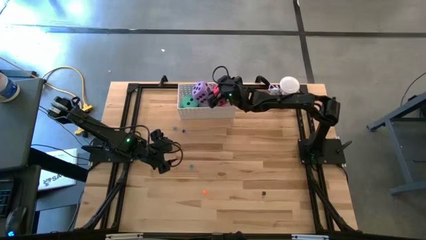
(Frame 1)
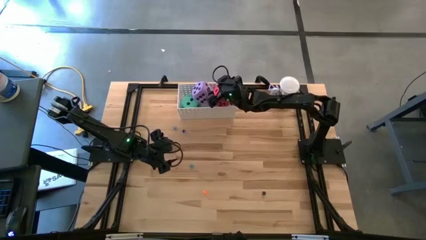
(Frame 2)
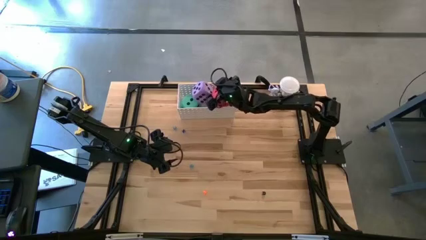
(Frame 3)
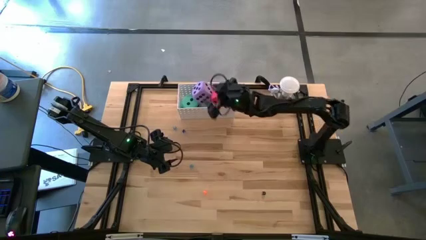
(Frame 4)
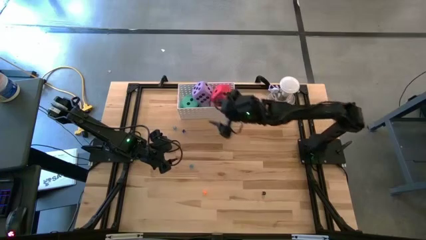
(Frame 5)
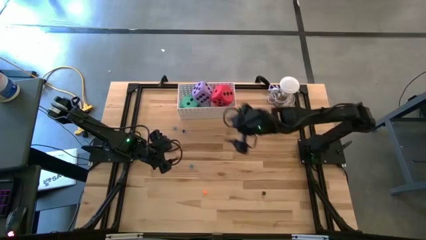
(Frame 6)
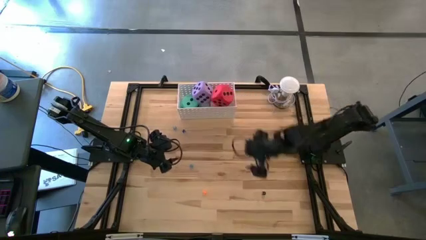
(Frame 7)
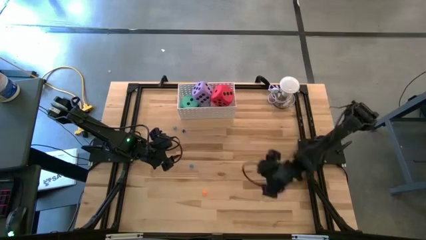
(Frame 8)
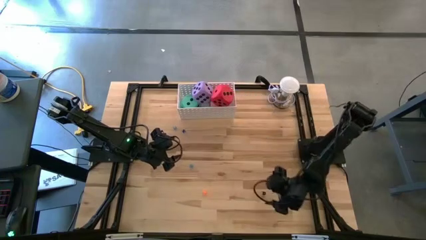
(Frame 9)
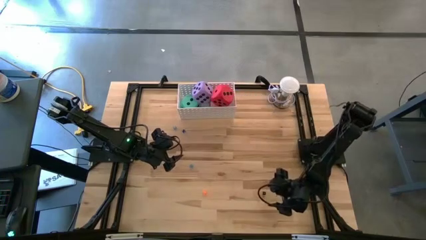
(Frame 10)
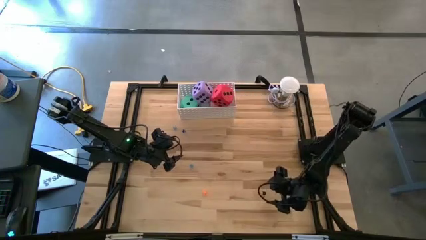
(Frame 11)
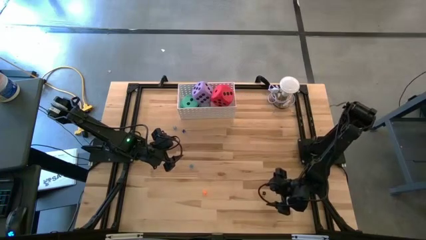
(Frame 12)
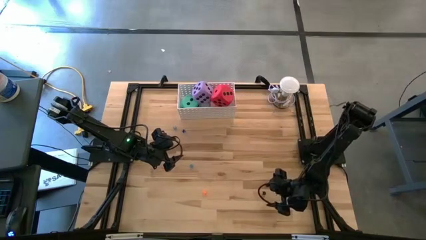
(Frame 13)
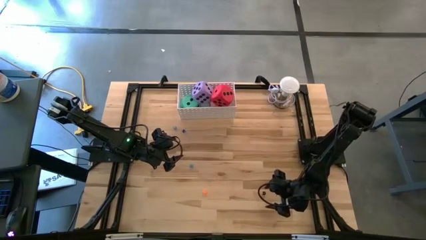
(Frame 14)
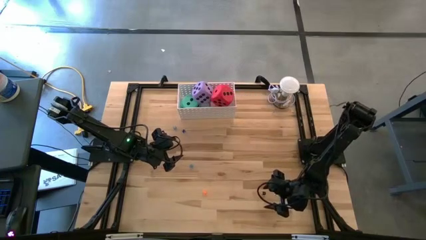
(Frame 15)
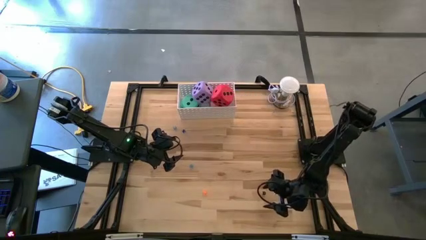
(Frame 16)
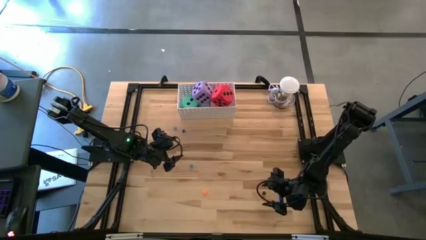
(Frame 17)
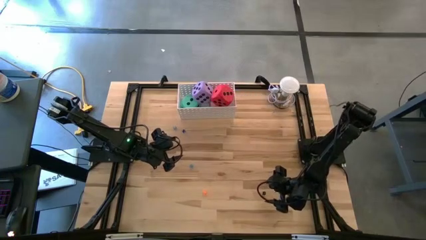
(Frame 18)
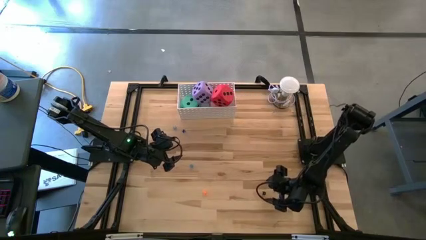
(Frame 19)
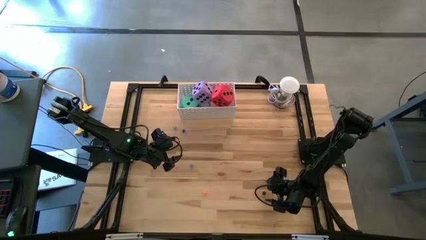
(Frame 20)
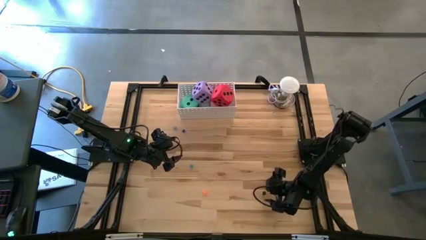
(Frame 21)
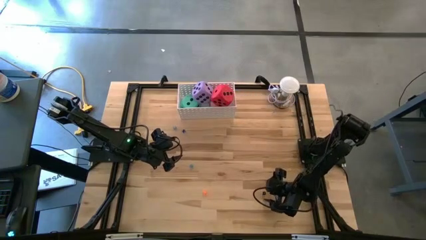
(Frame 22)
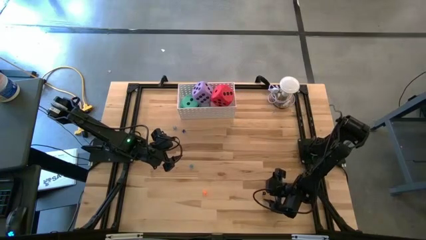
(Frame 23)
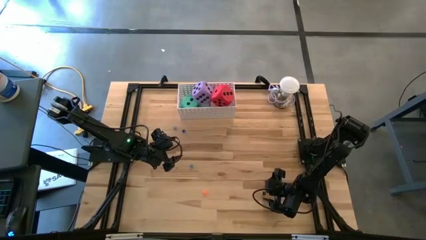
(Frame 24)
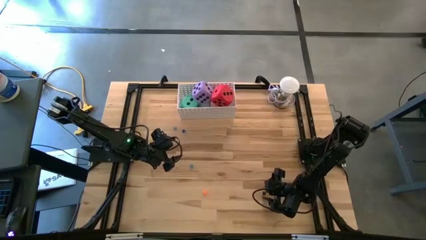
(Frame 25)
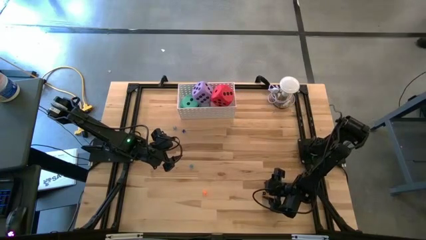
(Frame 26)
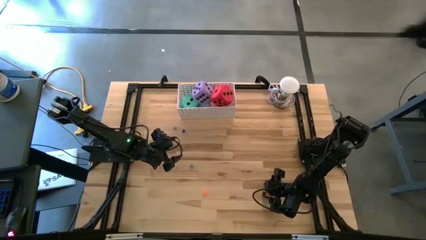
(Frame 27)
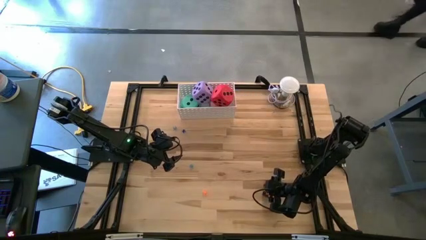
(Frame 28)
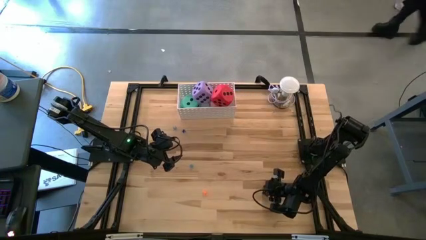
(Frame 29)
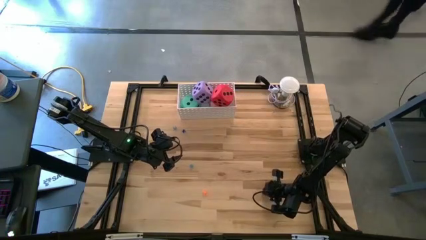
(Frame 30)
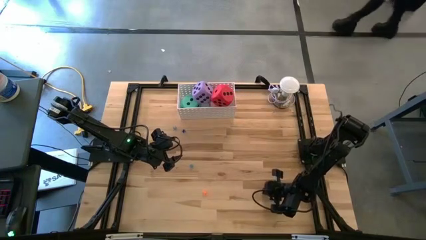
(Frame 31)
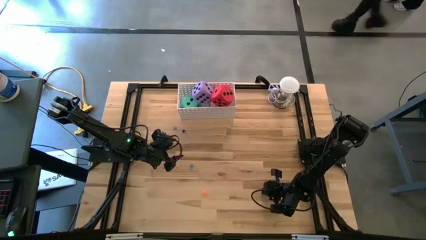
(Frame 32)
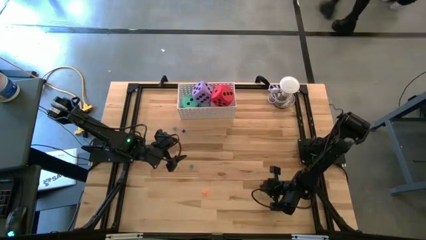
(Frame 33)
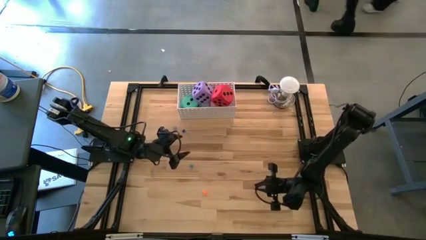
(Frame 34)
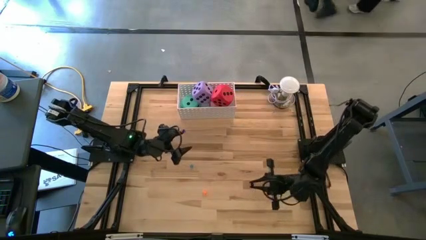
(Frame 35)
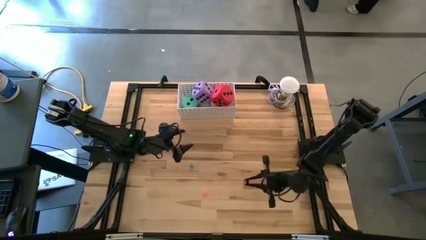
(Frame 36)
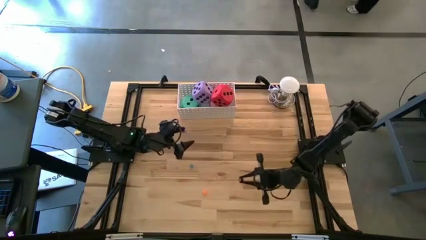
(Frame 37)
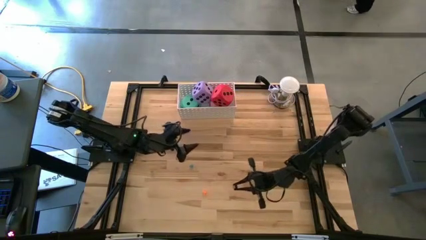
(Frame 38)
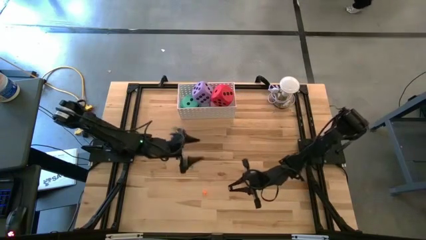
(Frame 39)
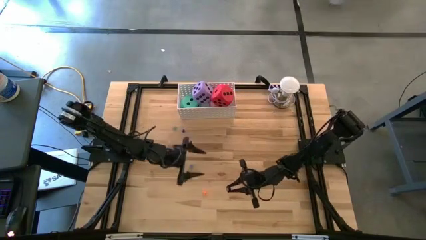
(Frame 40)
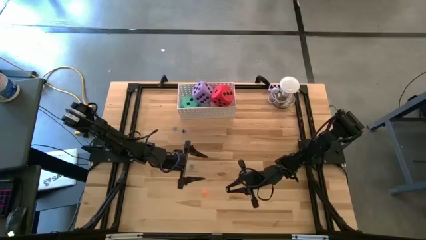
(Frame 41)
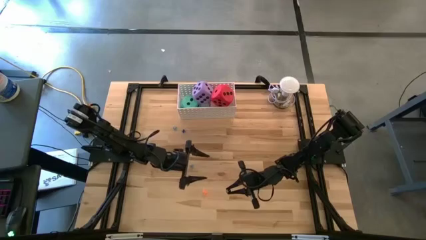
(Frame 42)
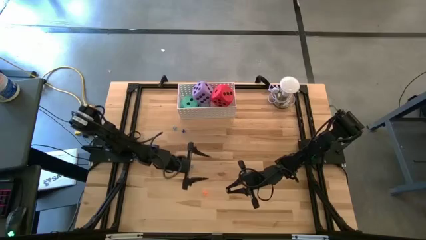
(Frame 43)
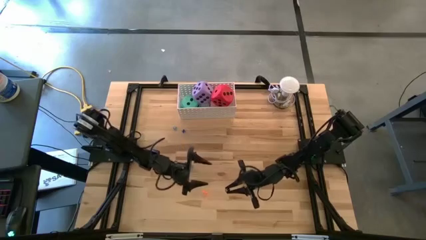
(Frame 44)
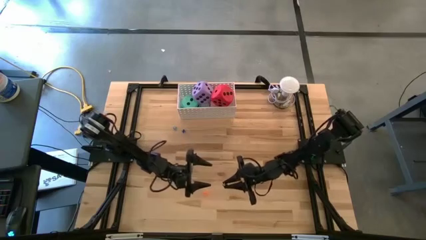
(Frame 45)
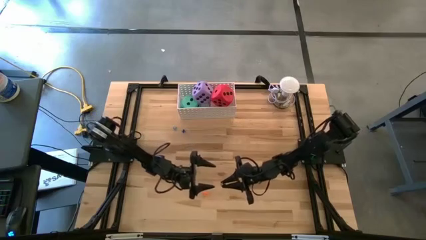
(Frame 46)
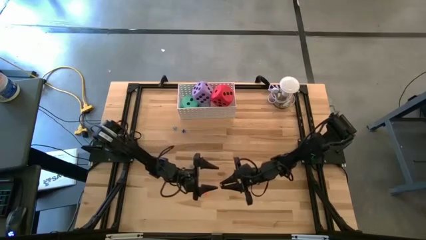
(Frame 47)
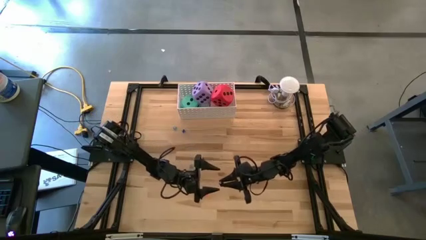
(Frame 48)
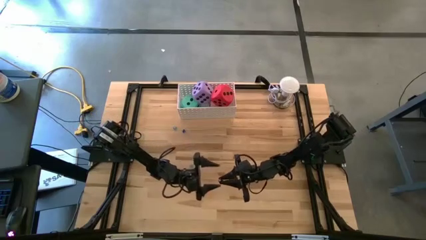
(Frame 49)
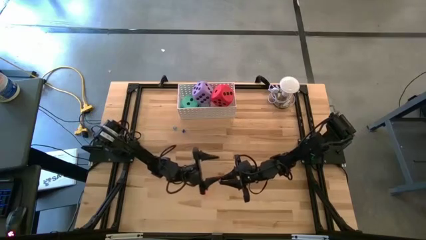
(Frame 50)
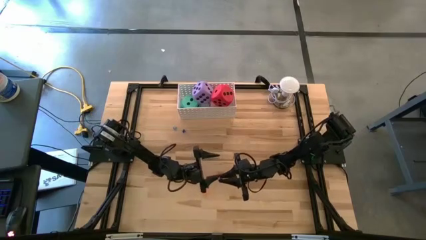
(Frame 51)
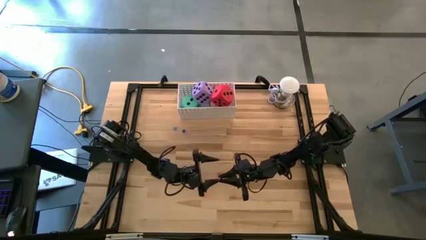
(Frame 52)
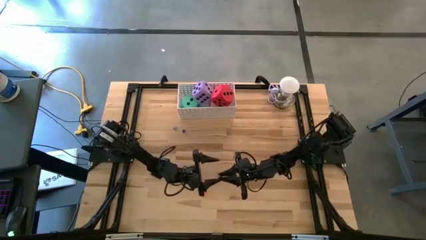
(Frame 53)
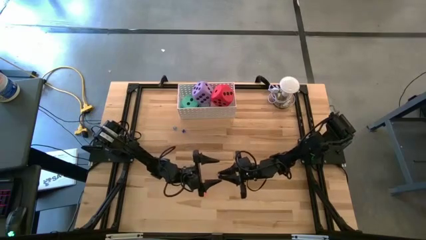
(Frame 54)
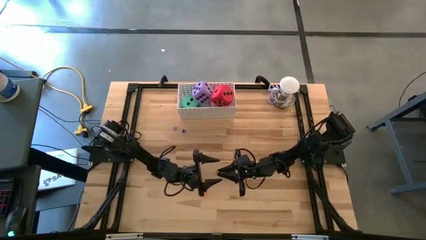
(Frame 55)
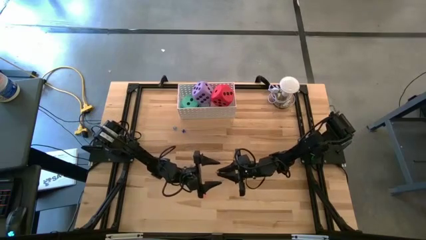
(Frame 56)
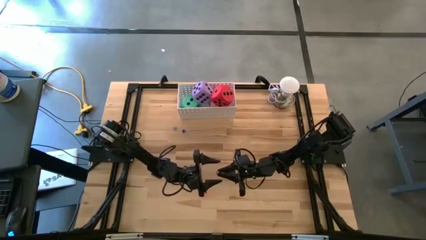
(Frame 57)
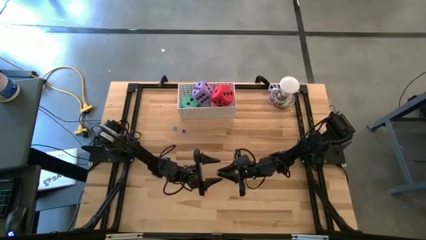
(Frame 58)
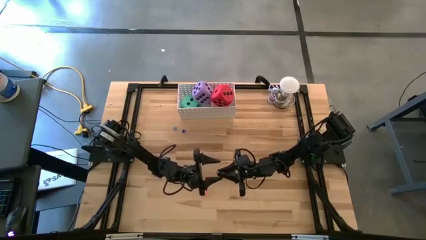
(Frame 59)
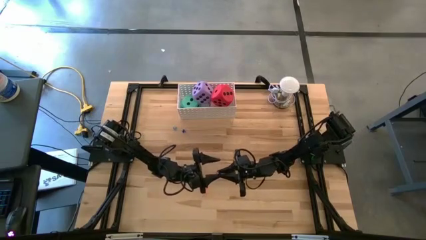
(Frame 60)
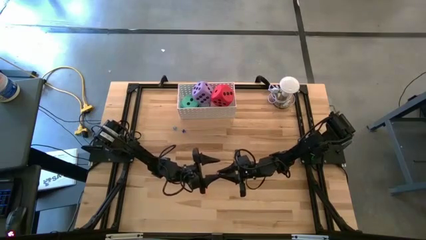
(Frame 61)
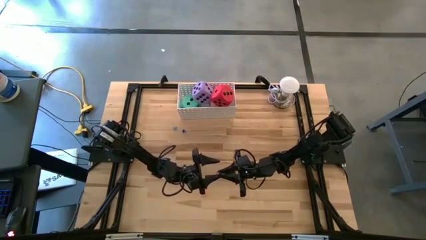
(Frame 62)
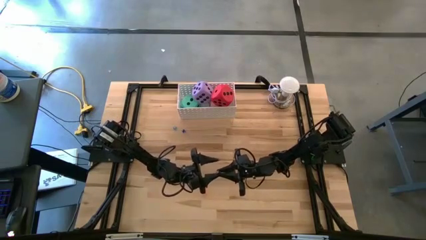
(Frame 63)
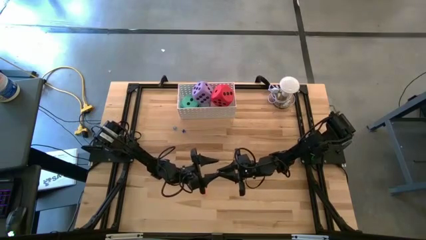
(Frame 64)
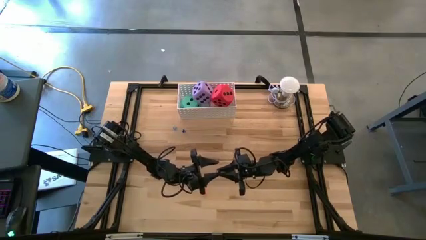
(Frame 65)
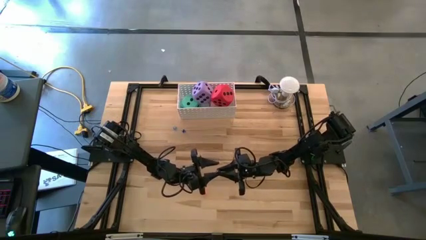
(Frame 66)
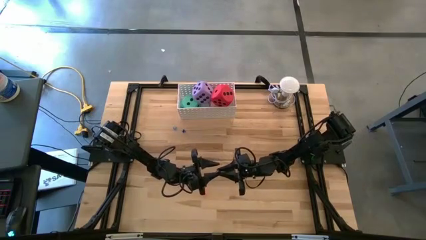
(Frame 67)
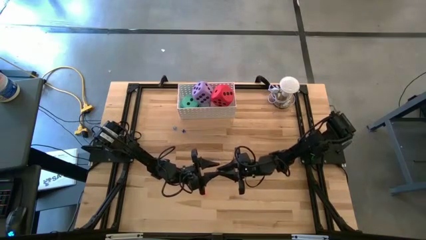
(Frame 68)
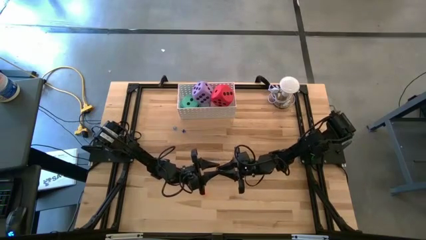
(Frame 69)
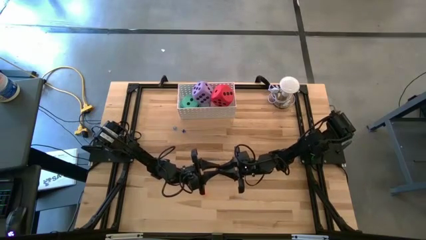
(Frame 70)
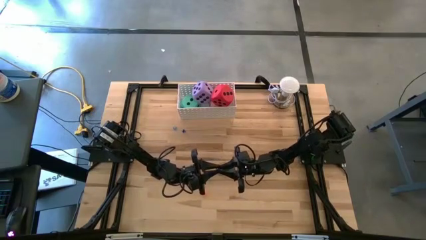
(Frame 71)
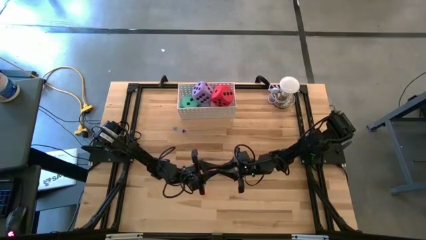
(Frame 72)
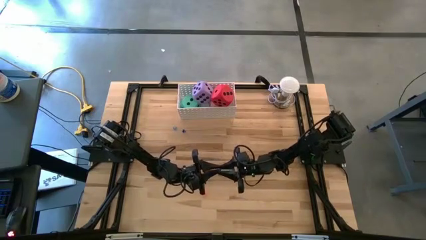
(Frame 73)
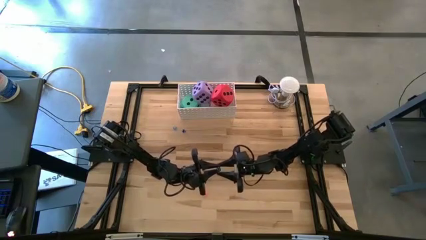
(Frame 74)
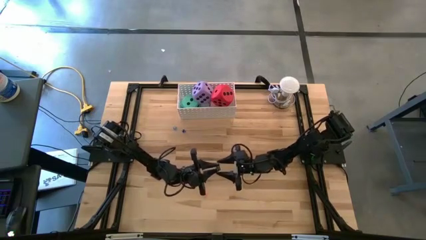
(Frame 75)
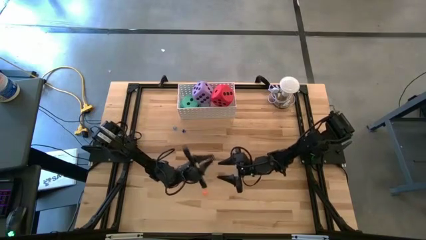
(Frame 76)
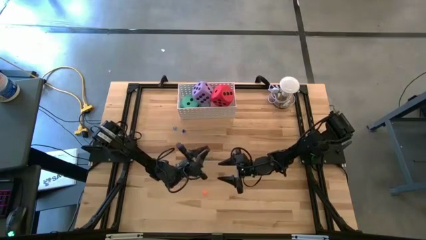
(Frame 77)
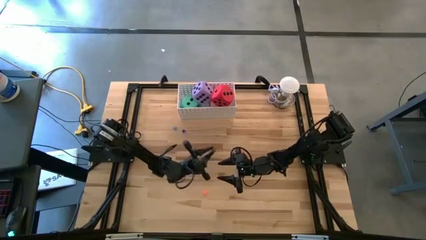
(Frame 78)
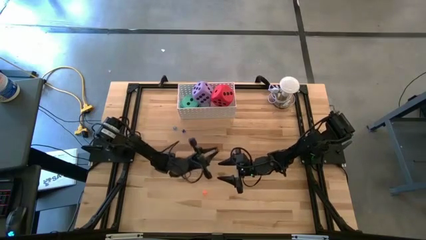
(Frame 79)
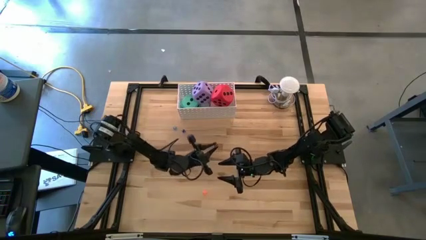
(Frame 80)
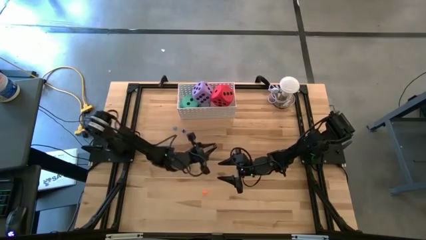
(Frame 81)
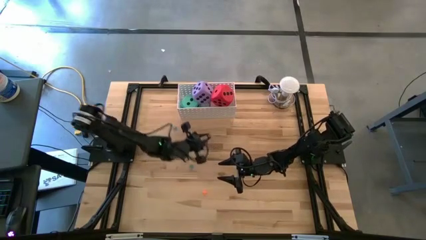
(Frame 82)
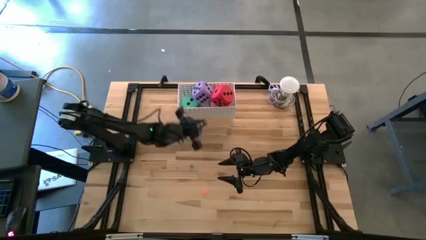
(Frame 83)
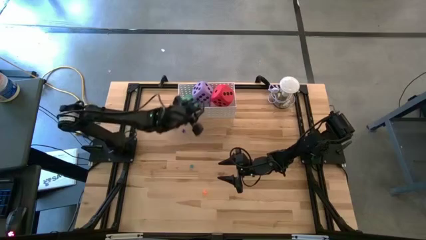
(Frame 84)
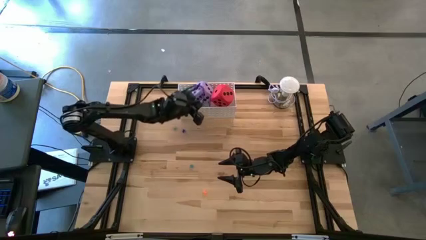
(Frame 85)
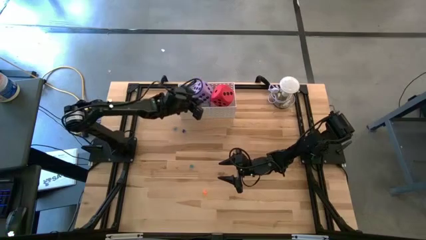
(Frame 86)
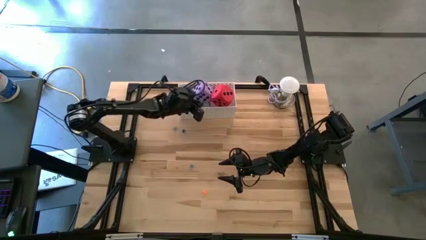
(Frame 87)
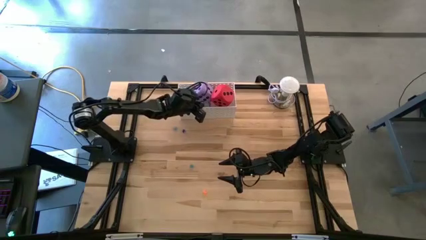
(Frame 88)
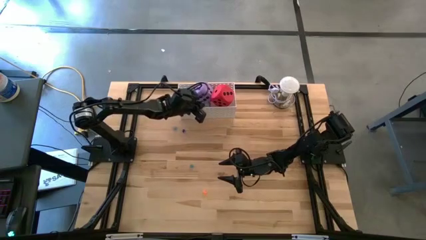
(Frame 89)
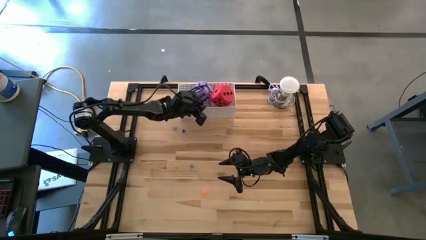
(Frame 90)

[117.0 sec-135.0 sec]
Task: Pick & Place Dice
Put the small black dice into the white basket
